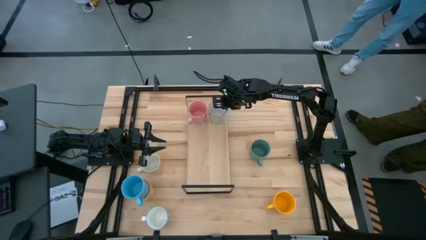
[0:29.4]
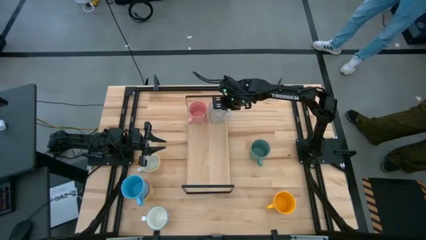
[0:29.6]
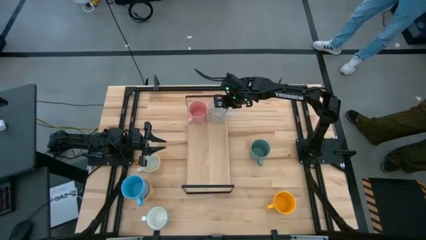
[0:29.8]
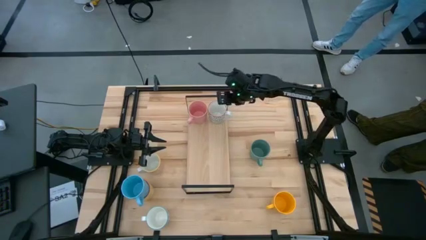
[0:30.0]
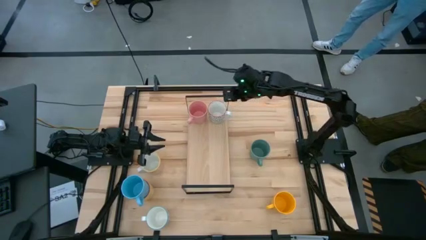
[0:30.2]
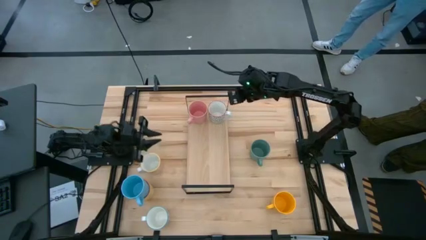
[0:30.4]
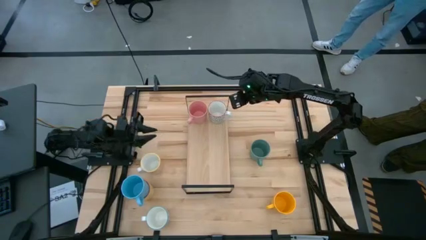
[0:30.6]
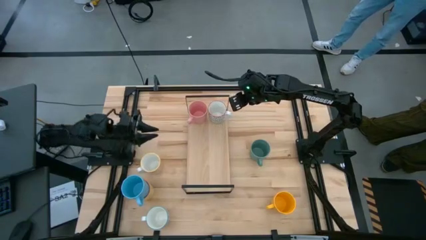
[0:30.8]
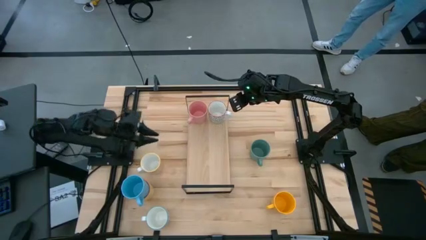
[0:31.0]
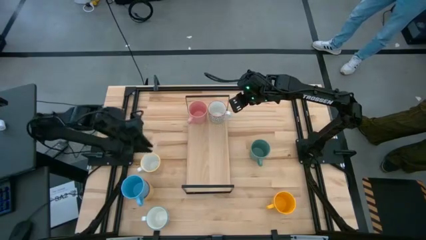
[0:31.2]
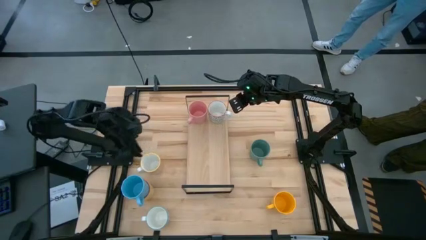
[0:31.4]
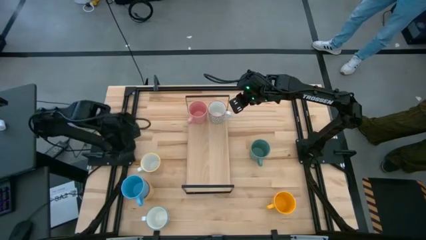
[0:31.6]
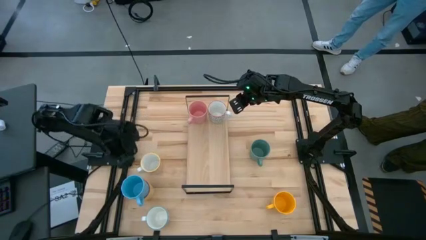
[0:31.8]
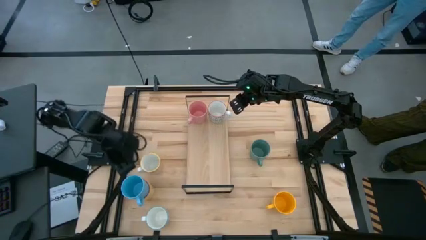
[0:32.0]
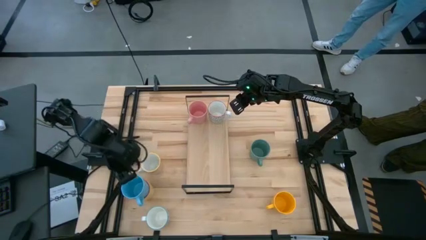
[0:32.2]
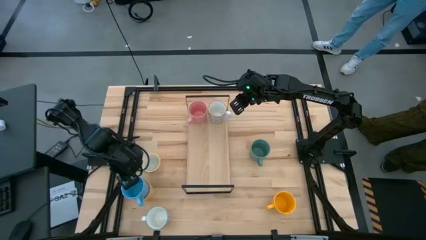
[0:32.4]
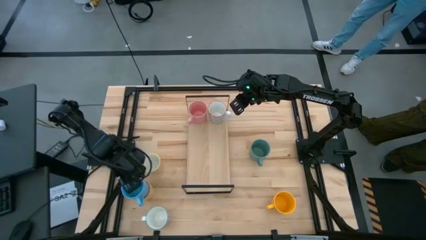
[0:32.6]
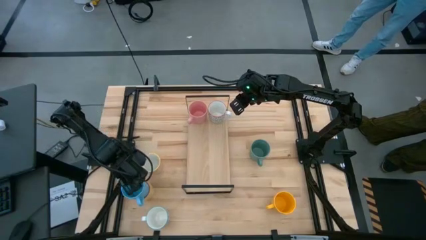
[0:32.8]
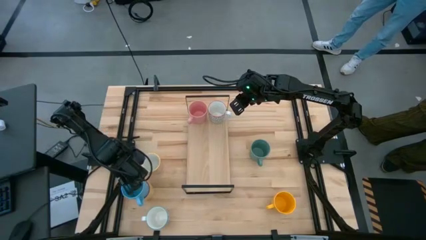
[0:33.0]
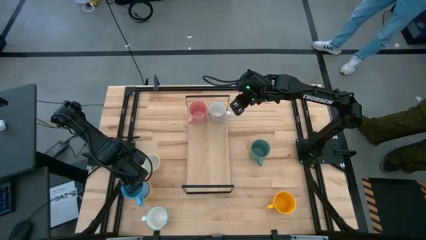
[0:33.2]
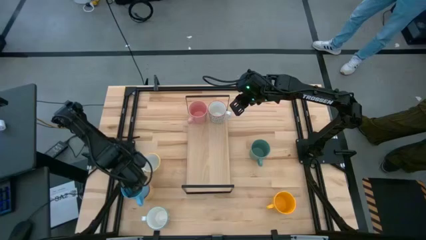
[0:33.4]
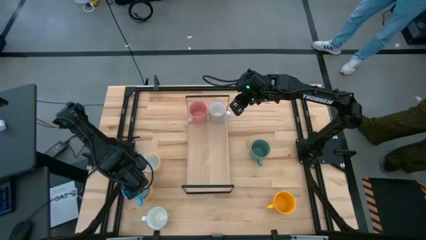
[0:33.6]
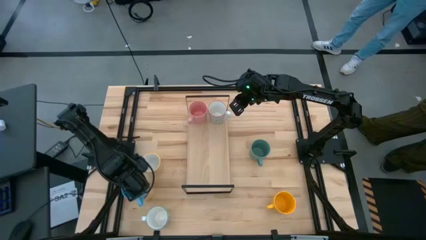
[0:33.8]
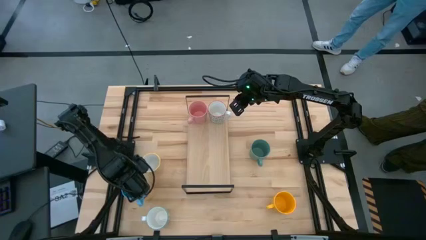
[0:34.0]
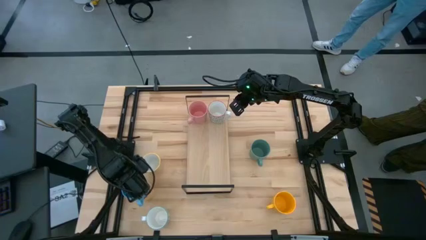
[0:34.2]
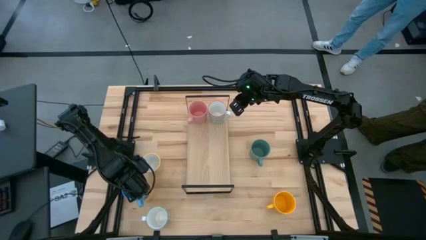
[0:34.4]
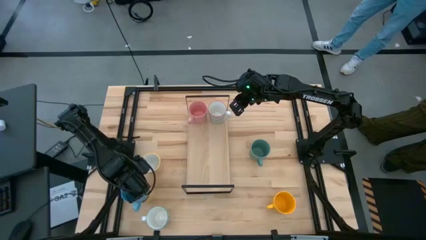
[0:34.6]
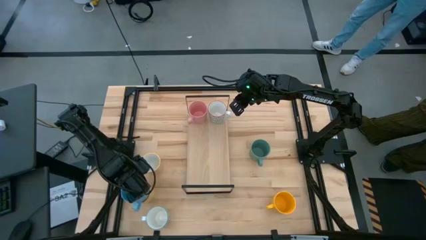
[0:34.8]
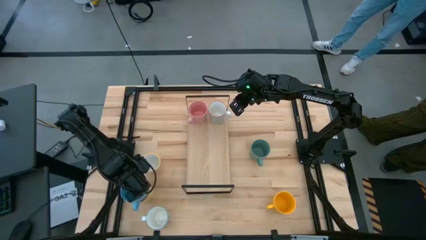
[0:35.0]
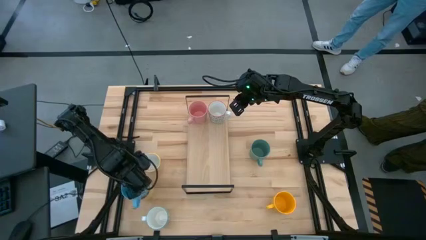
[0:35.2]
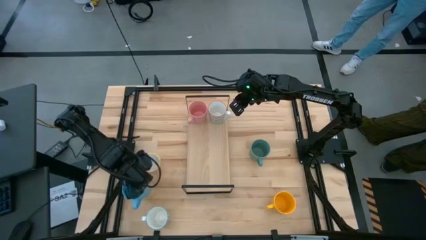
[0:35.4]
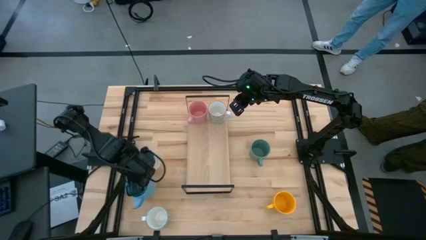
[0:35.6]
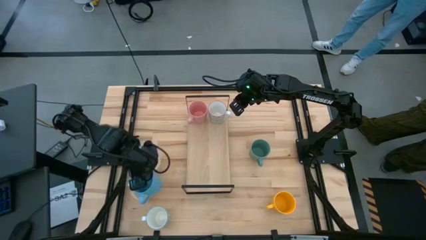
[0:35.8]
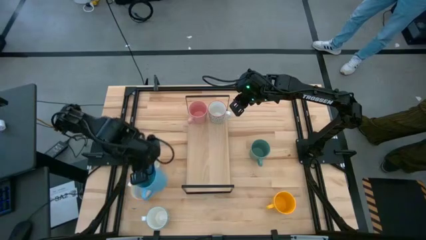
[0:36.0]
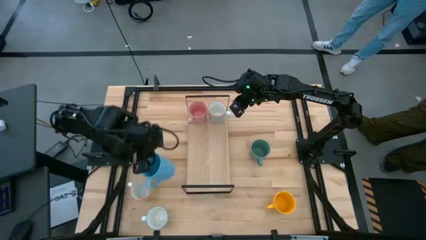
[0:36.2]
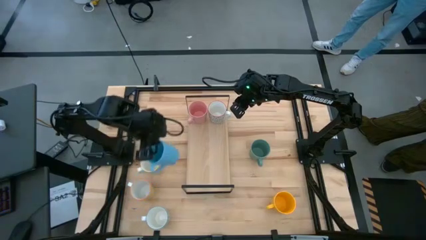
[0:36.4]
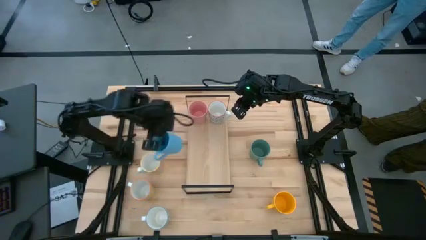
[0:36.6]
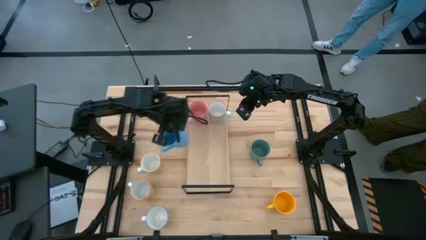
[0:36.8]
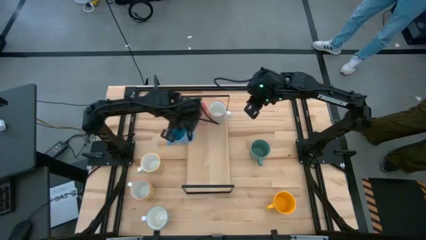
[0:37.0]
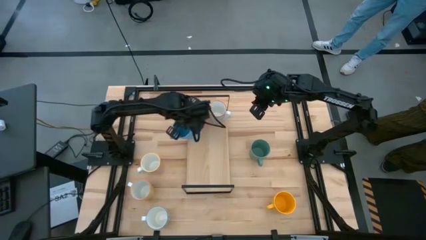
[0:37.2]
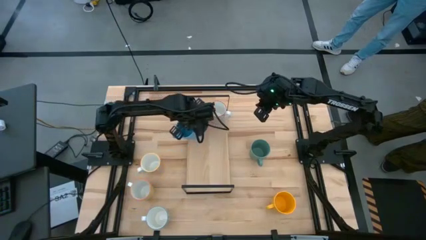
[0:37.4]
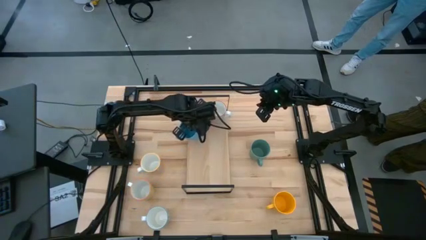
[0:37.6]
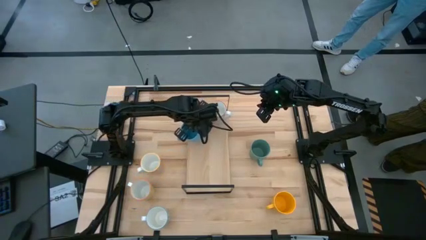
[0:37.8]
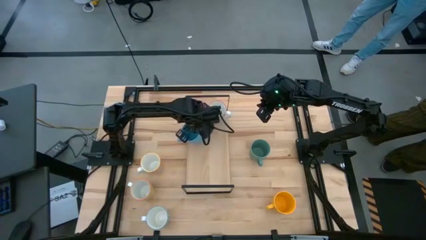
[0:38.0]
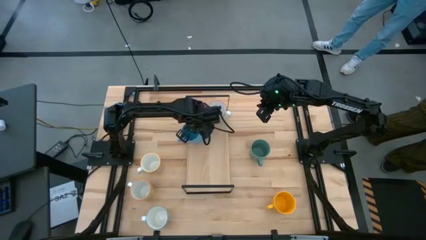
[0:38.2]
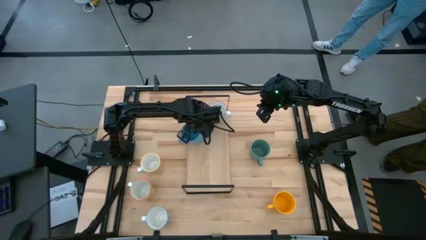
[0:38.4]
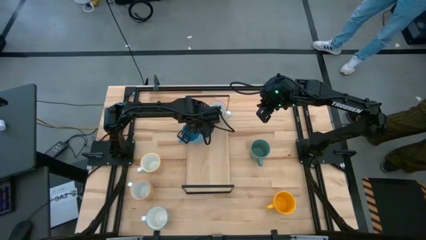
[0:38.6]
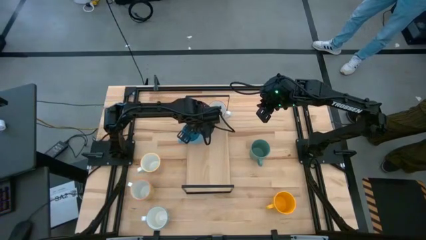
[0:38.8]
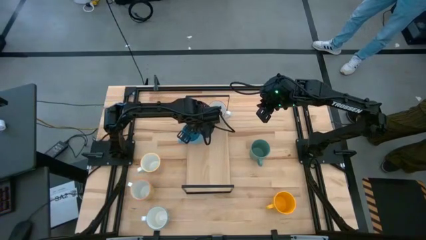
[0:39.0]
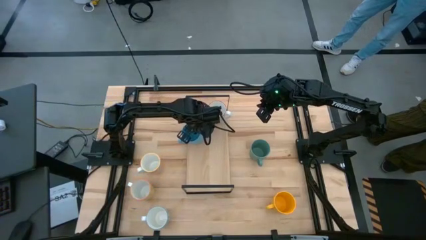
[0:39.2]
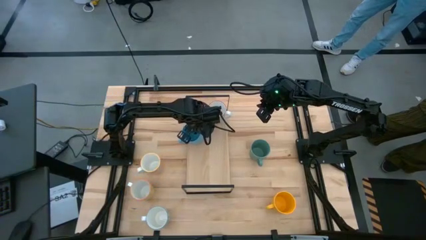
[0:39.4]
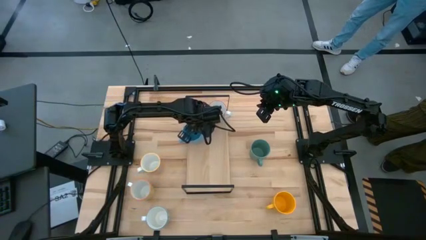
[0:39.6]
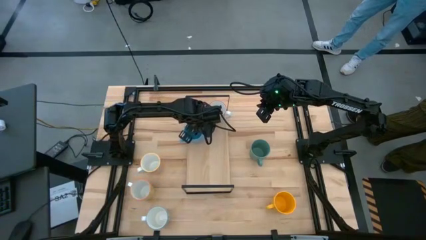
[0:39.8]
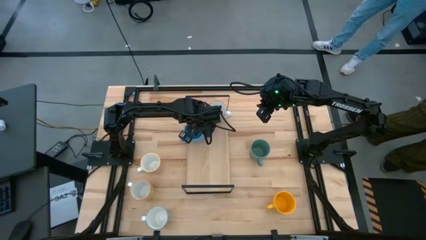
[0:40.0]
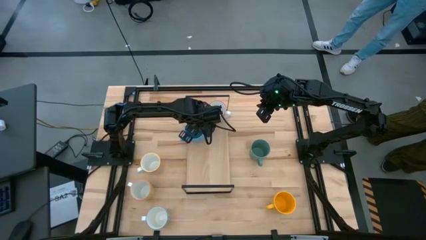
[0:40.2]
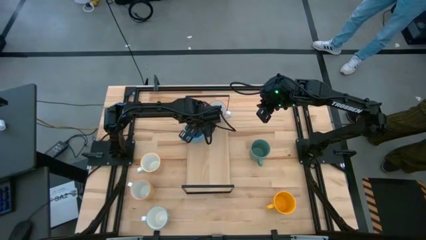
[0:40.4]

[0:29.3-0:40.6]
Task: Place coffee mugs
Put the blue mug on the shelf

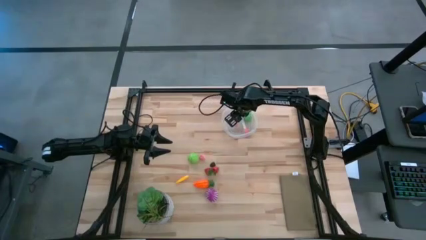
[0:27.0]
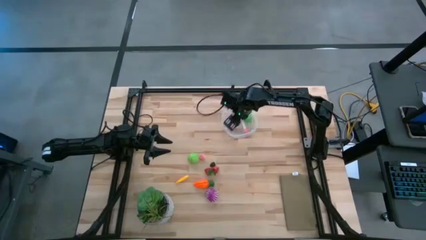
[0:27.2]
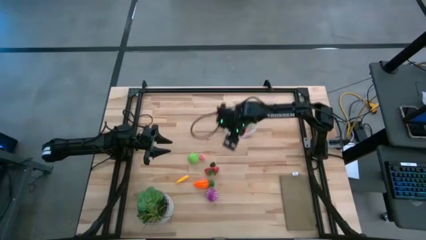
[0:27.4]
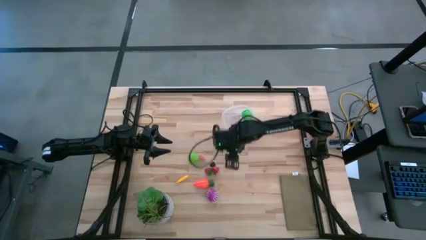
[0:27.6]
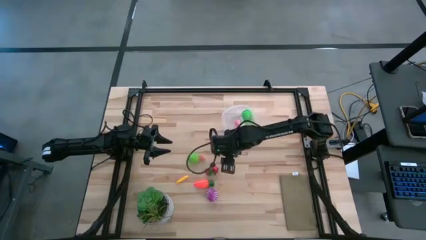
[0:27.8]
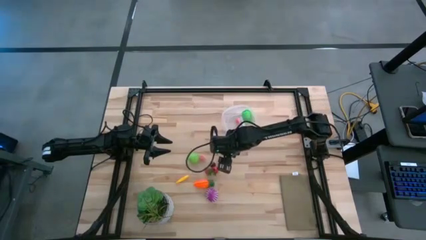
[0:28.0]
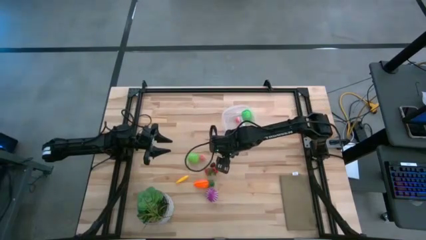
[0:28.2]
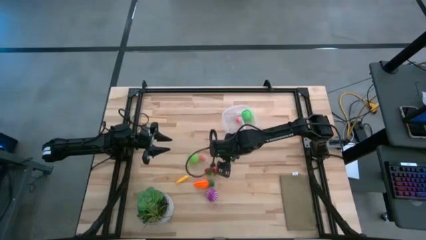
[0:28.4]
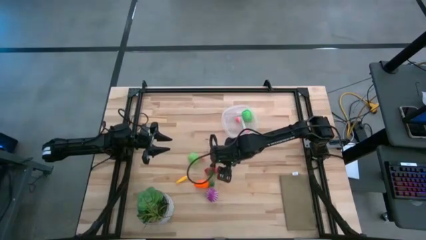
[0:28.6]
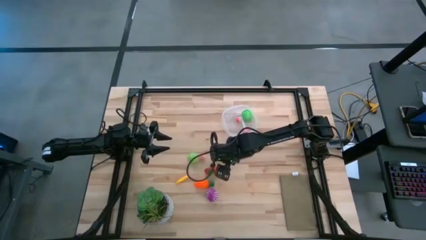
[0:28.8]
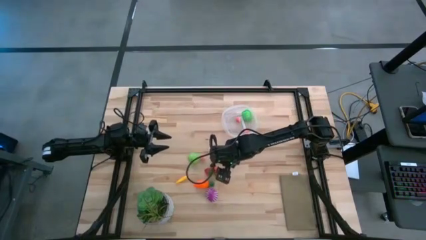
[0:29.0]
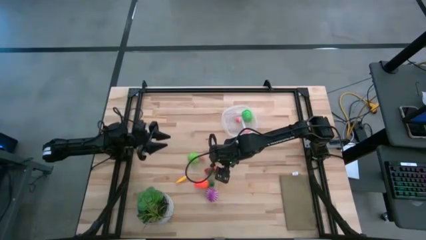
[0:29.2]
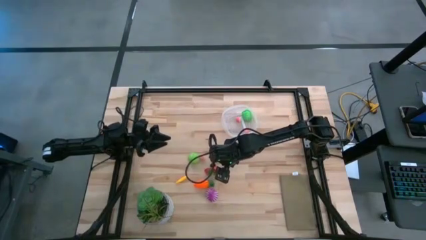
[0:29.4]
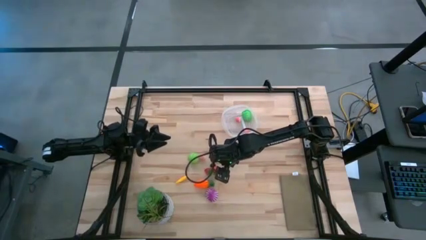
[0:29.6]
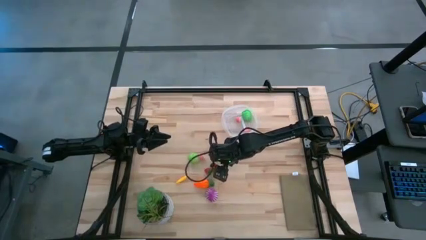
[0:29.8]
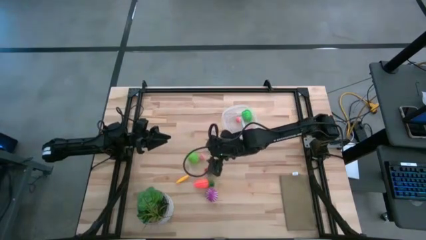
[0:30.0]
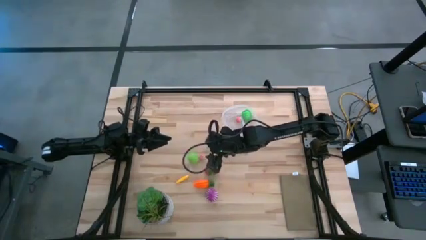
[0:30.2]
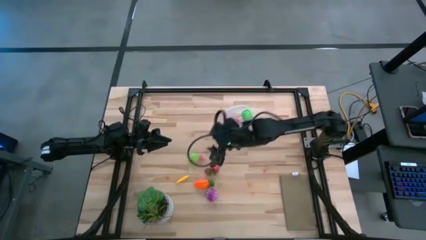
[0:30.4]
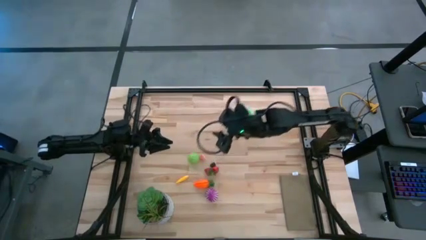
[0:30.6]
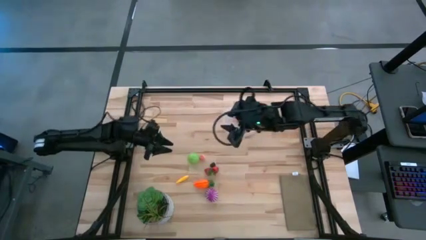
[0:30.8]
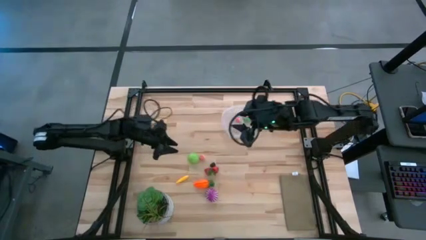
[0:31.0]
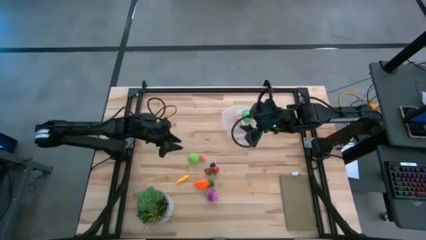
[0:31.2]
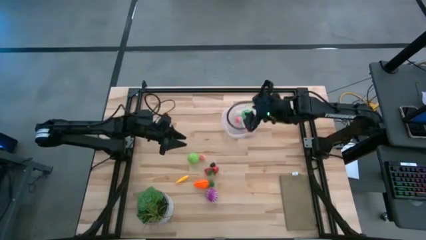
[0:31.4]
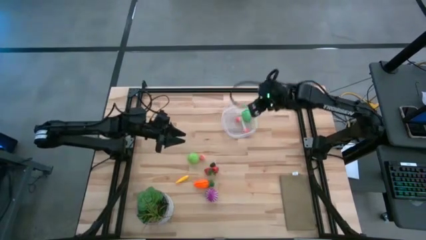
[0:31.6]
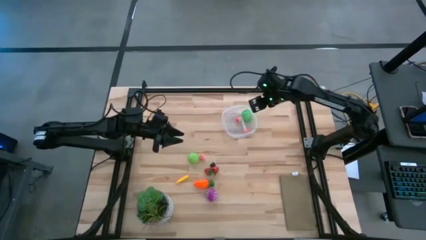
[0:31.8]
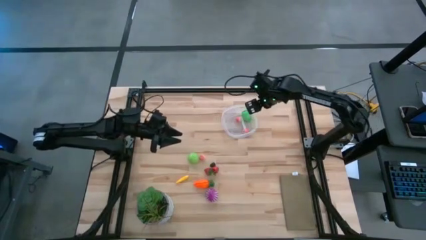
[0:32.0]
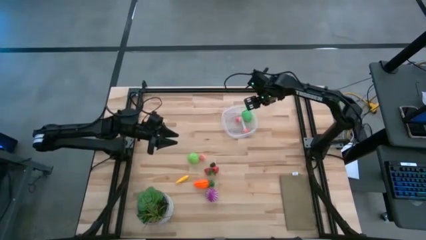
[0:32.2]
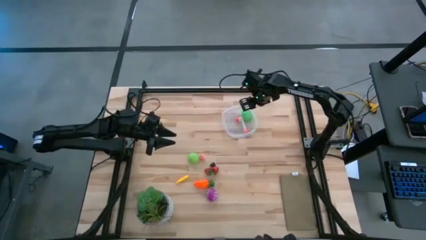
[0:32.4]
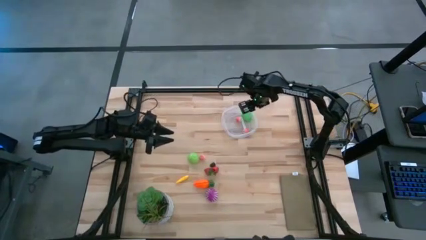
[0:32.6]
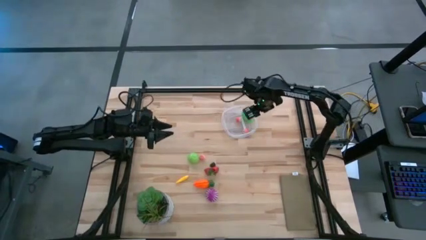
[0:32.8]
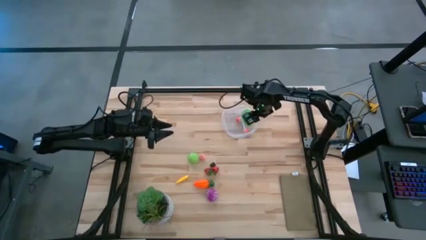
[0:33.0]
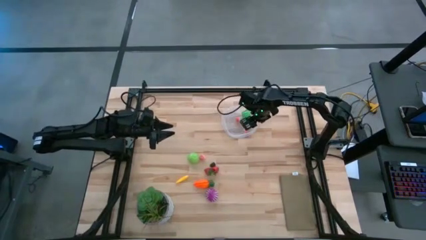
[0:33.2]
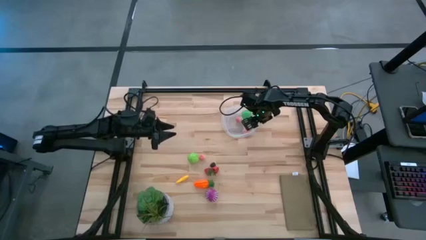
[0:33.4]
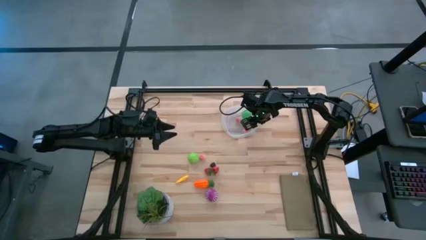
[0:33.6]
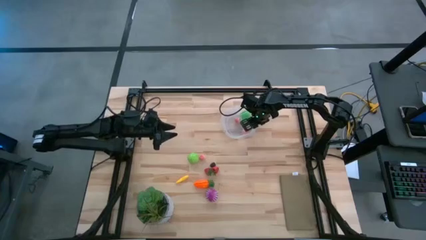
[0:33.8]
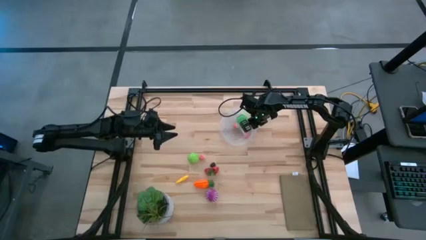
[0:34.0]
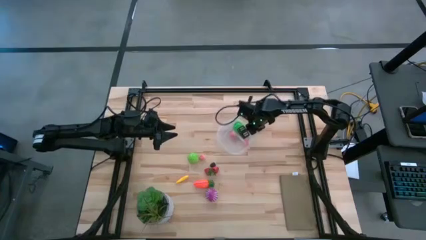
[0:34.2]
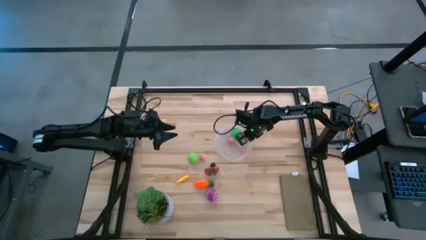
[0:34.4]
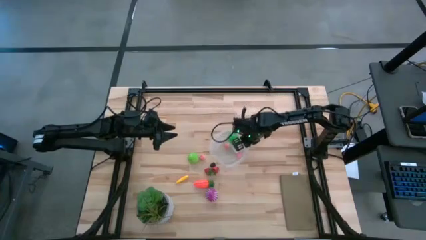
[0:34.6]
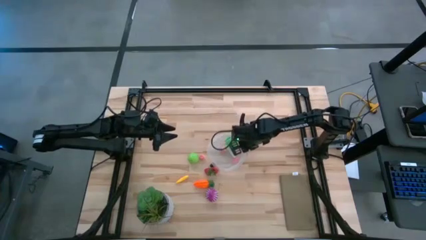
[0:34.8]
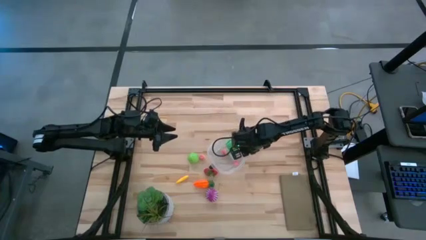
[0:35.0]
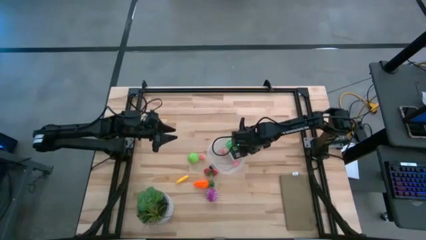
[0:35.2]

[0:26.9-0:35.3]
Task: Pick and placing Produce into tupperware
Move the transparent bin to the center of the table
